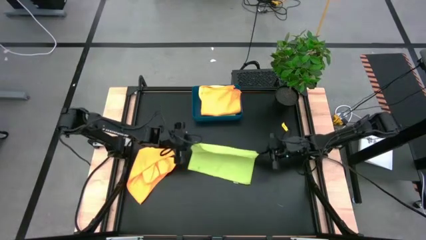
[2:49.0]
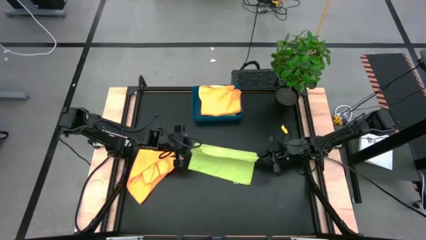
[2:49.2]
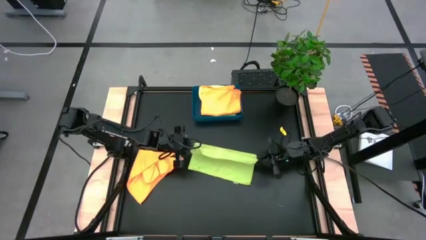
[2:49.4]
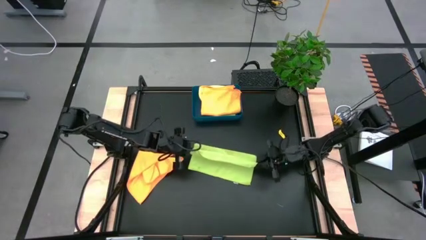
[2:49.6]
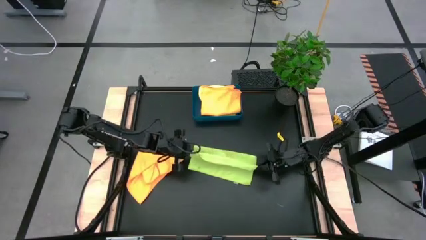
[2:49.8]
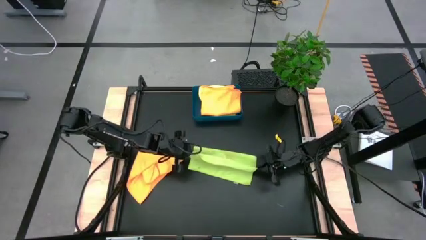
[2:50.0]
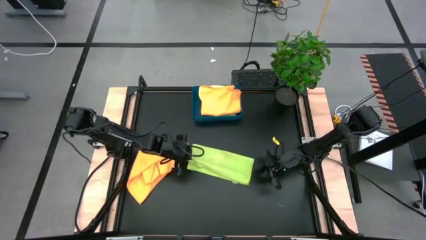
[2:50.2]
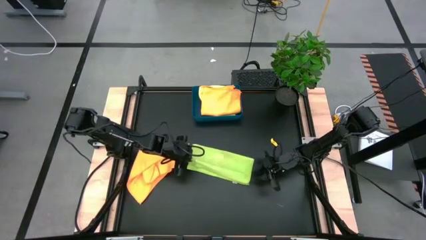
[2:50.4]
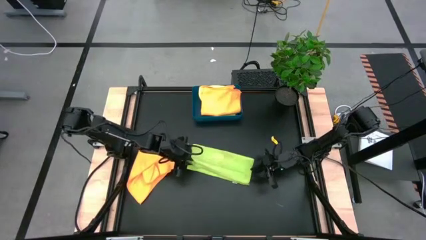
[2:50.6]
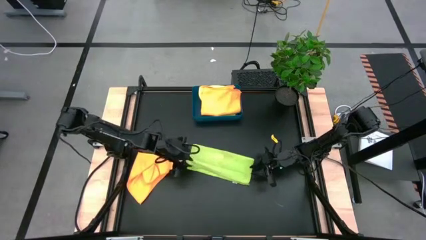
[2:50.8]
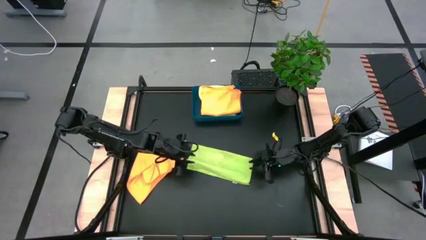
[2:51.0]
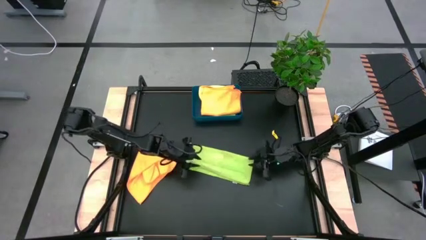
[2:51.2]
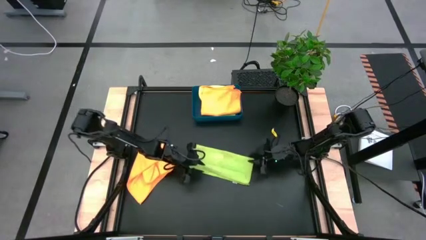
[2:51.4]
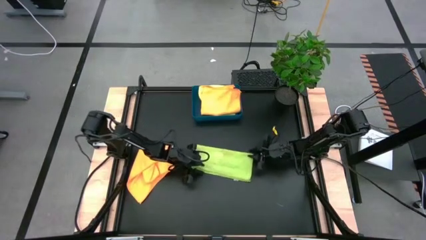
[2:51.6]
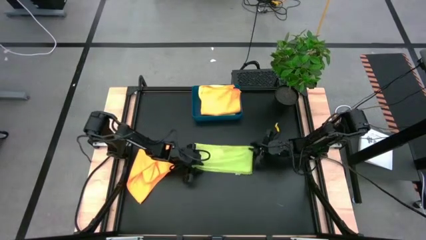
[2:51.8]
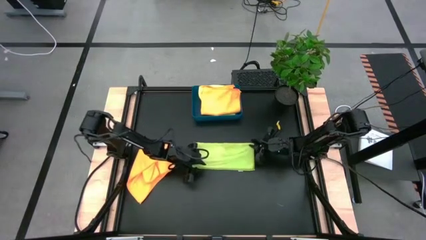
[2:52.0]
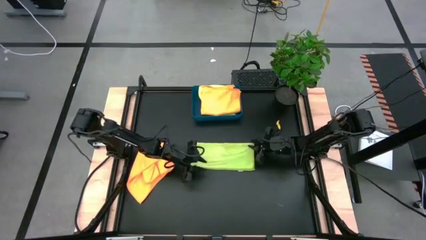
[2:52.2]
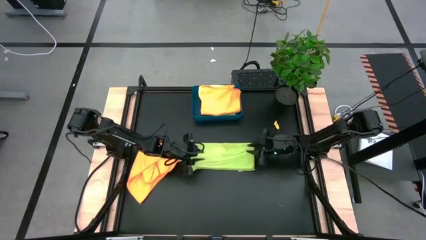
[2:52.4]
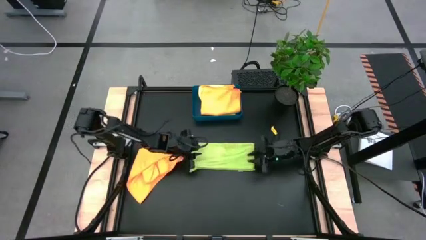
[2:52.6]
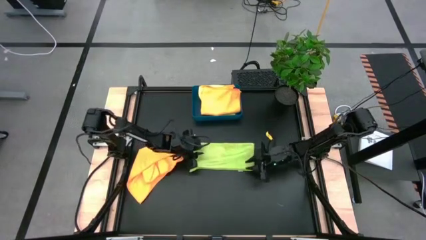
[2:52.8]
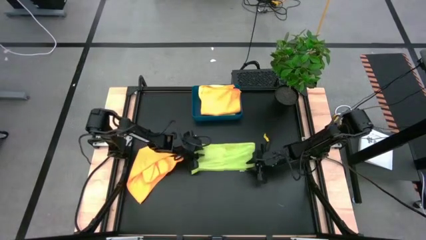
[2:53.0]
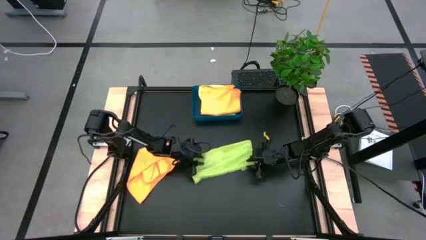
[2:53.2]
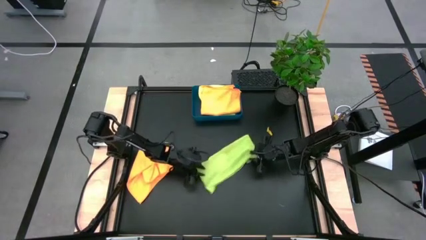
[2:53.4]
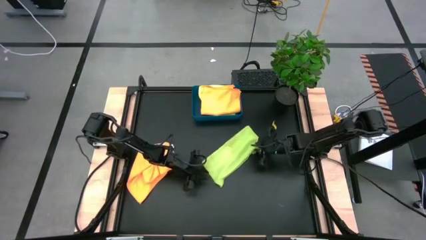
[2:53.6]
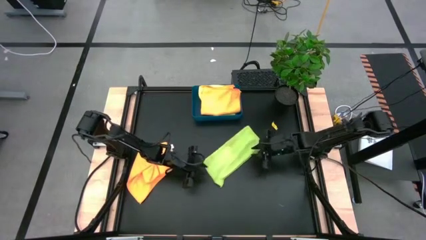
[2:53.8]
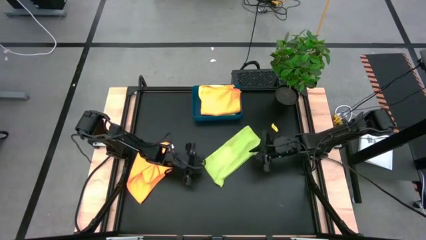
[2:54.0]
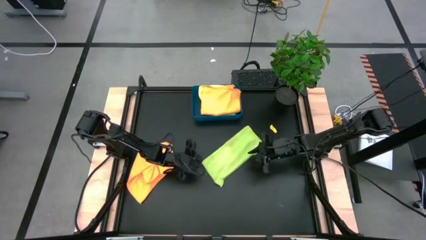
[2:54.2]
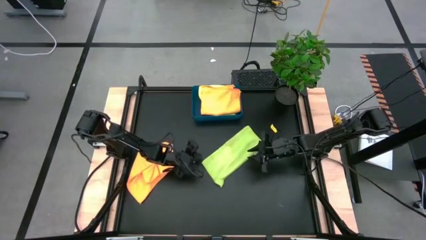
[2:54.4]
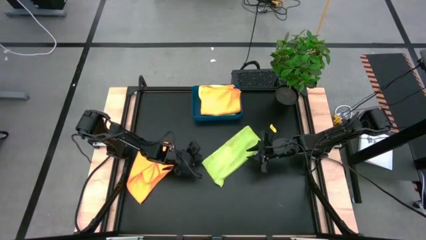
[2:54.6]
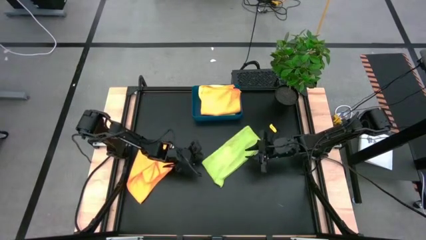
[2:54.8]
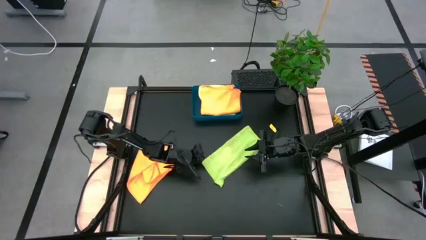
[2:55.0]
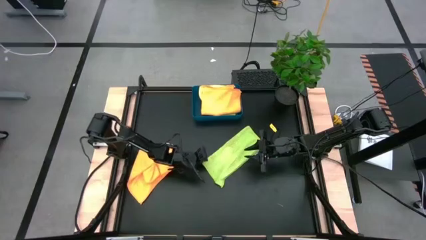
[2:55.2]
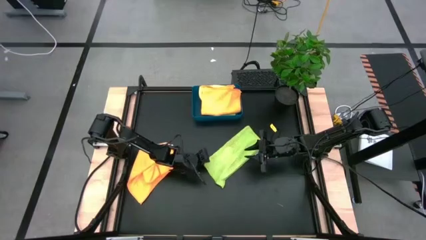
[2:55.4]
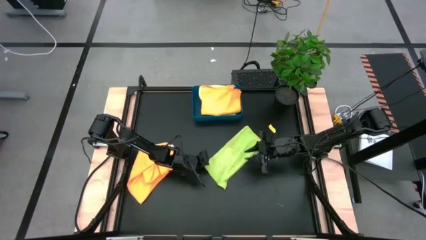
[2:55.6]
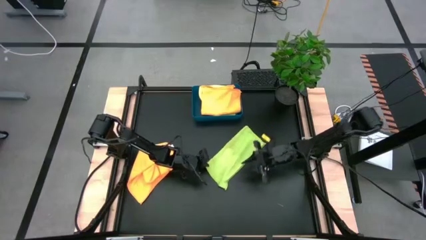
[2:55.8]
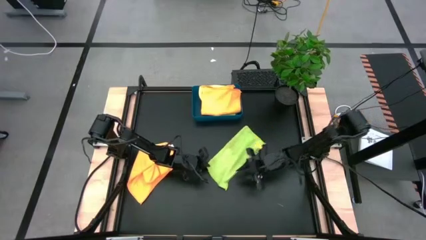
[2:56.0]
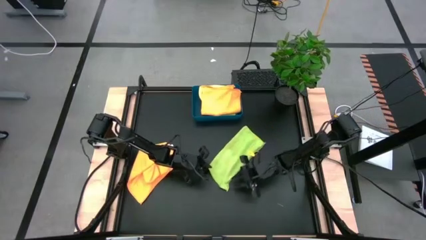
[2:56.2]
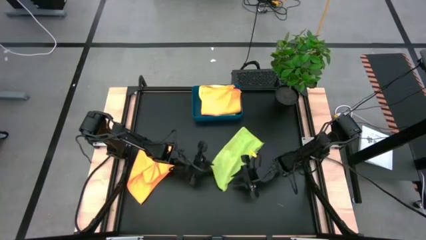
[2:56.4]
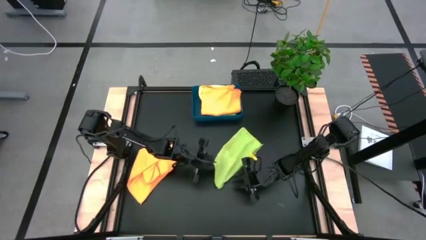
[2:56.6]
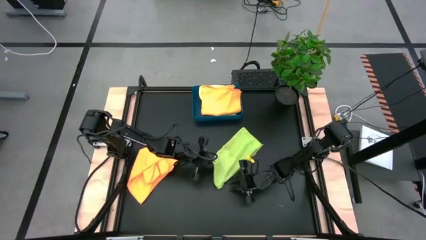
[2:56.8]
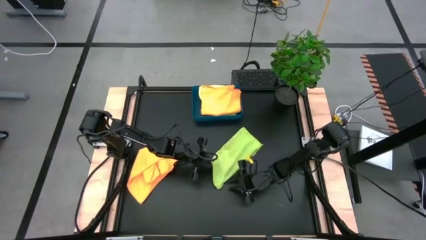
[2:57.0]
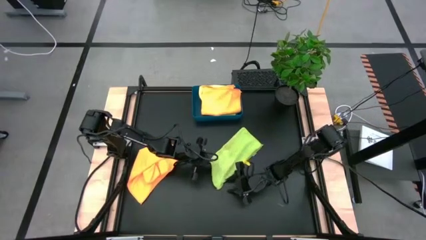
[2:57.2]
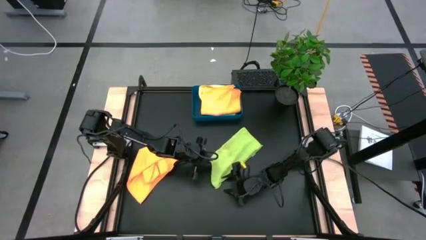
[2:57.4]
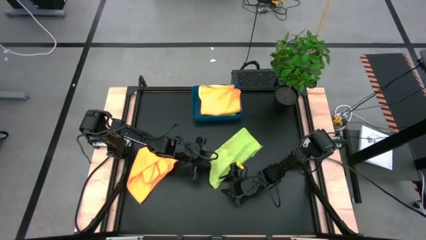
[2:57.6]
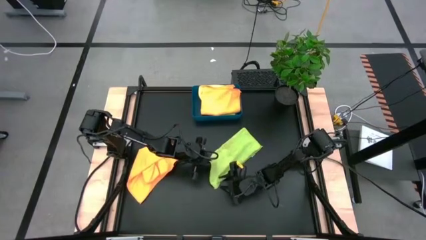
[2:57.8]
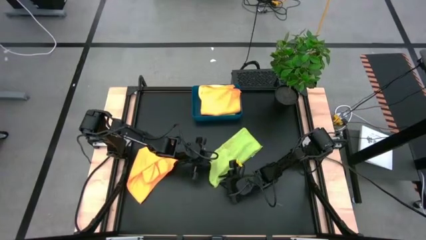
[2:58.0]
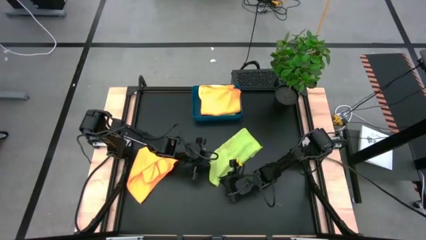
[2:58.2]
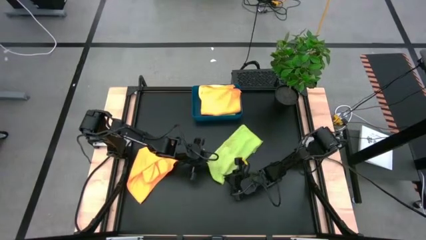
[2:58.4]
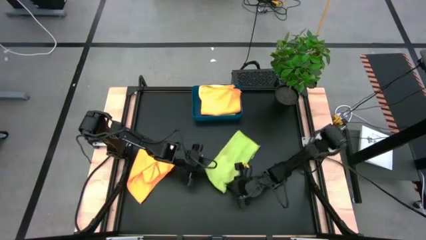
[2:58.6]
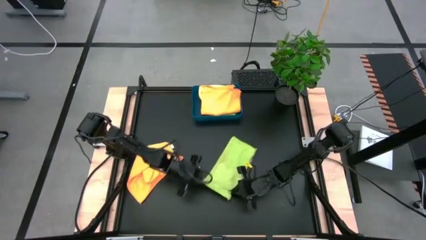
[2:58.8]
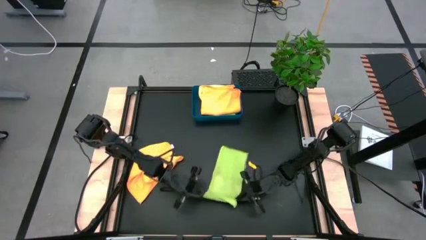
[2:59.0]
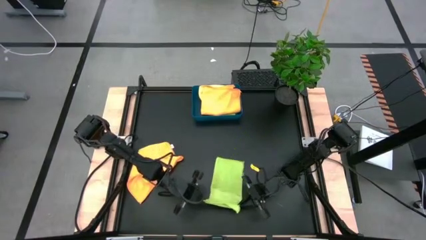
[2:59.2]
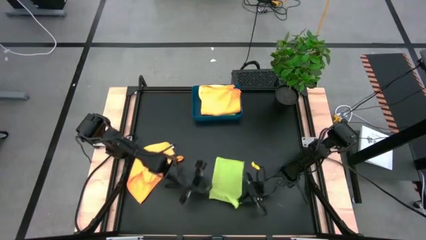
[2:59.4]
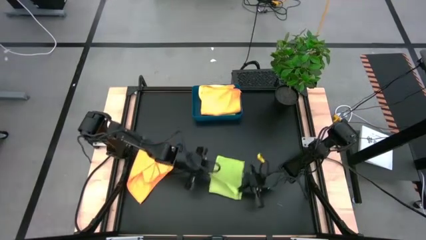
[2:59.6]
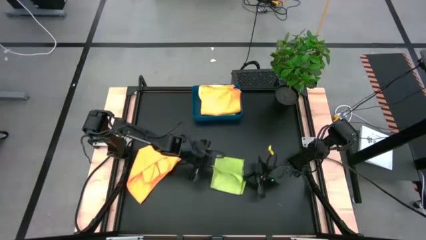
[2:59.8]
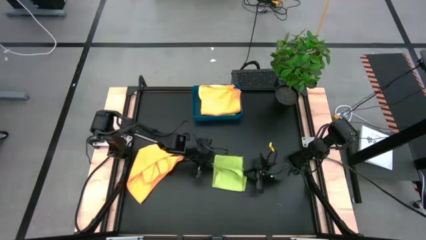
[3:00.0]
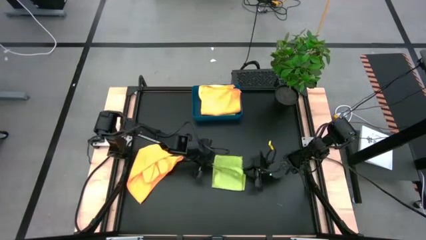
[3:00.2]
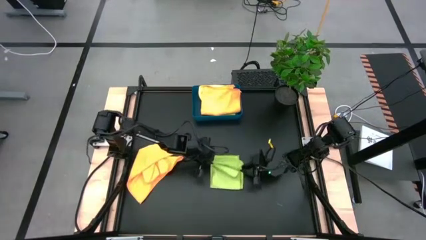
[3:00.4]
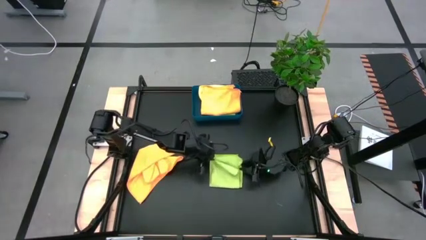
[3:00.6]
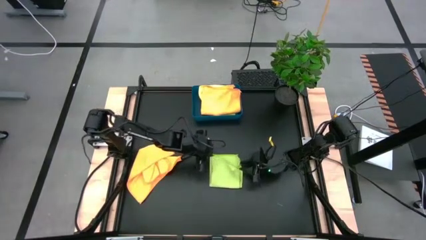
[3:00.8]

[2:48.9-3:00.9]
Task: Fold microfiber towels
Fold the green microfiber cloth
